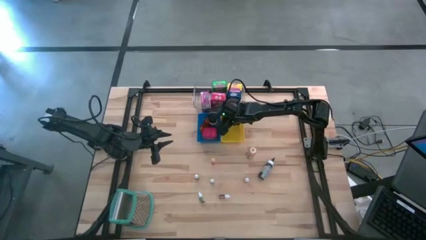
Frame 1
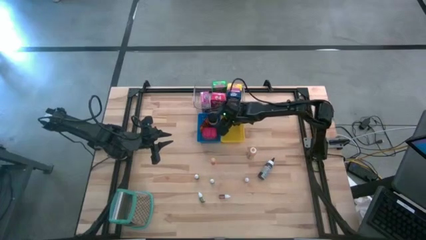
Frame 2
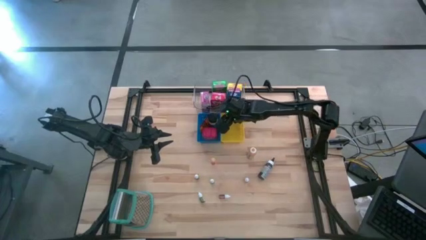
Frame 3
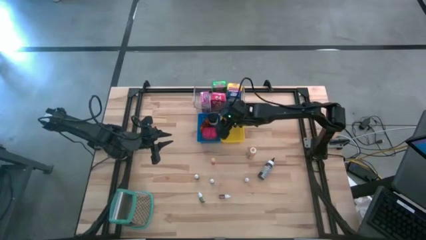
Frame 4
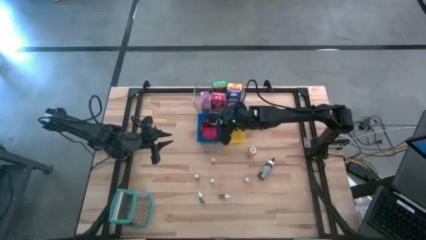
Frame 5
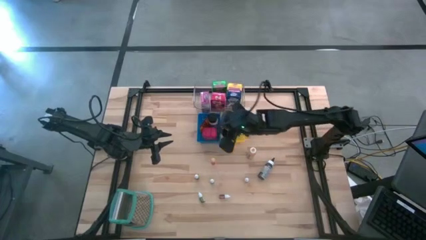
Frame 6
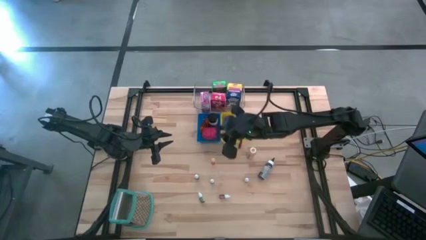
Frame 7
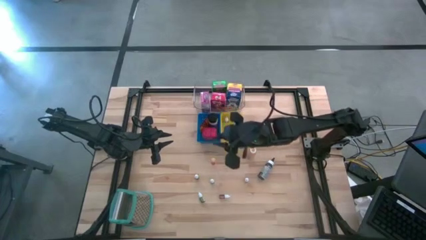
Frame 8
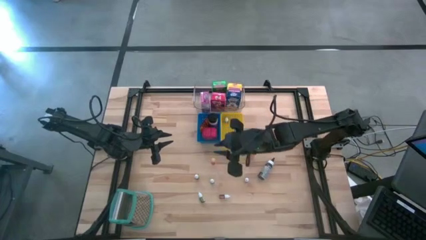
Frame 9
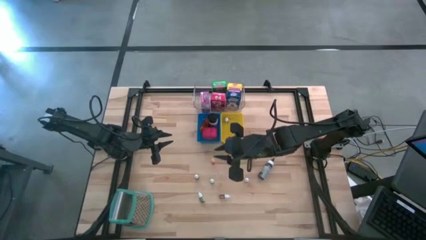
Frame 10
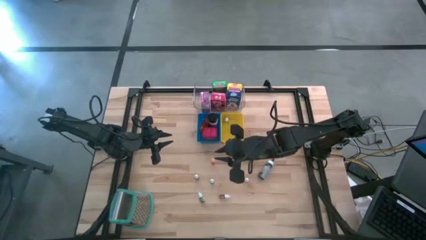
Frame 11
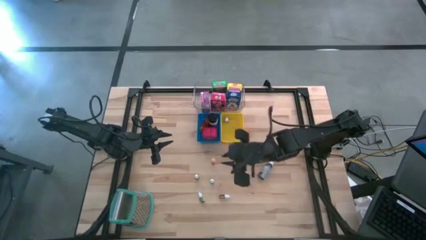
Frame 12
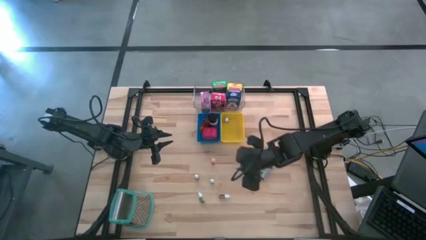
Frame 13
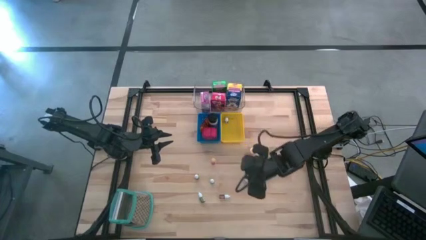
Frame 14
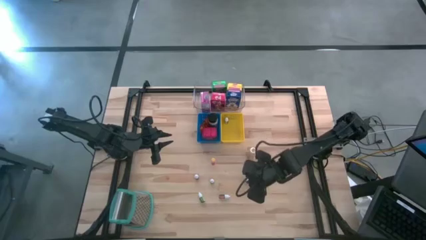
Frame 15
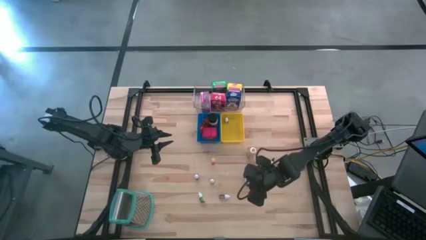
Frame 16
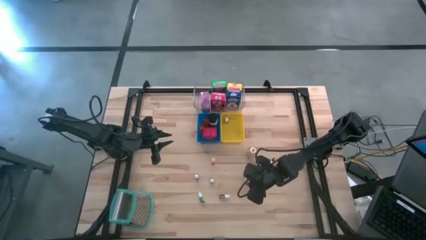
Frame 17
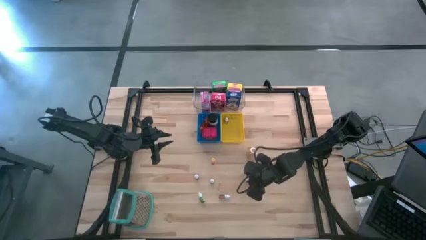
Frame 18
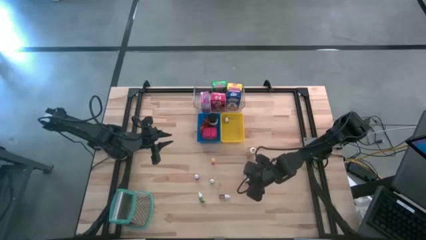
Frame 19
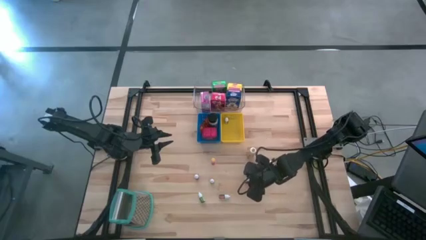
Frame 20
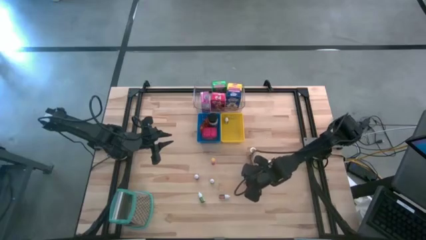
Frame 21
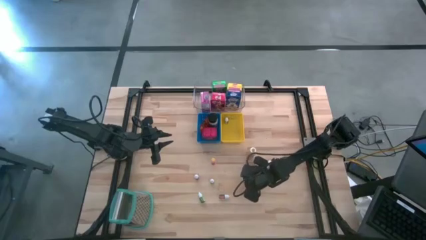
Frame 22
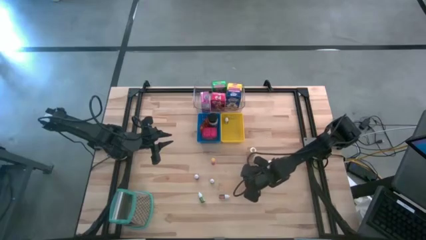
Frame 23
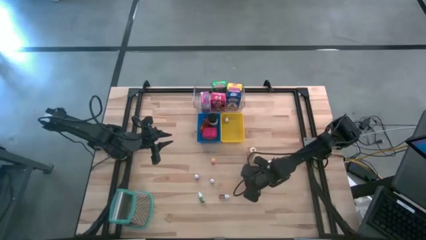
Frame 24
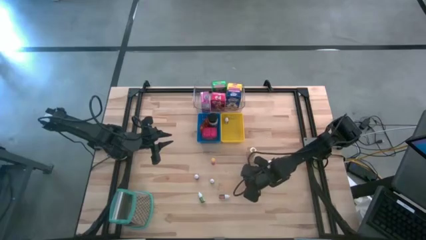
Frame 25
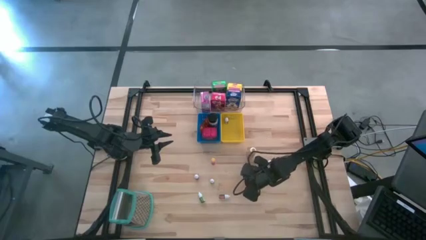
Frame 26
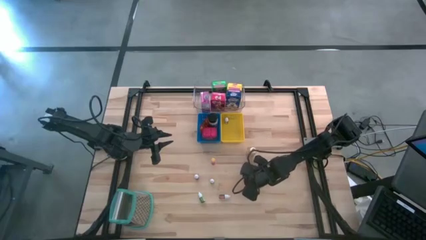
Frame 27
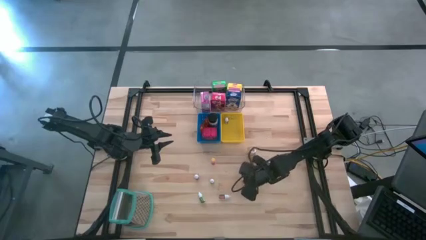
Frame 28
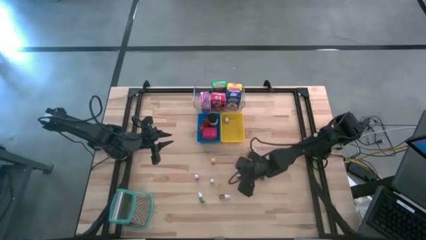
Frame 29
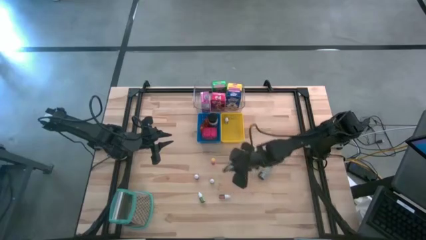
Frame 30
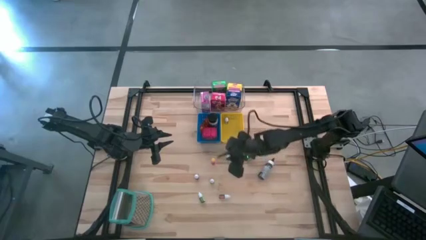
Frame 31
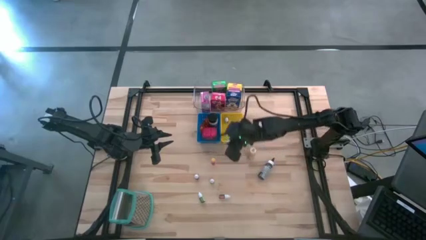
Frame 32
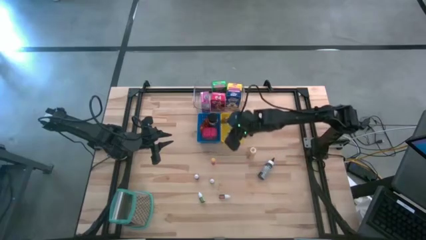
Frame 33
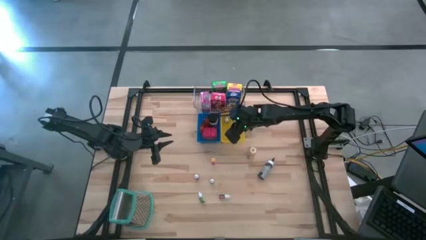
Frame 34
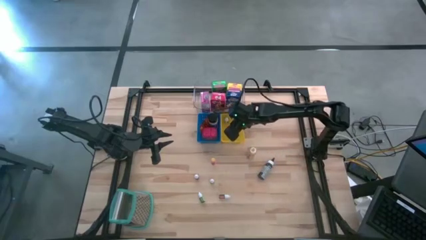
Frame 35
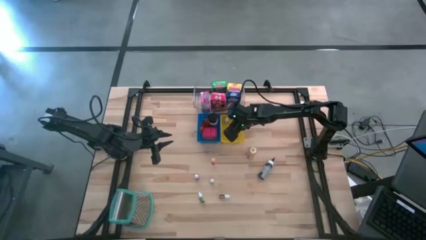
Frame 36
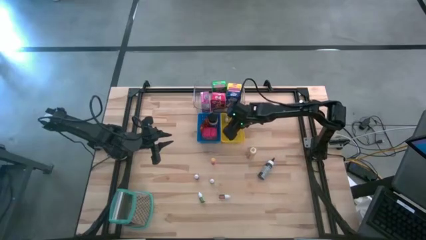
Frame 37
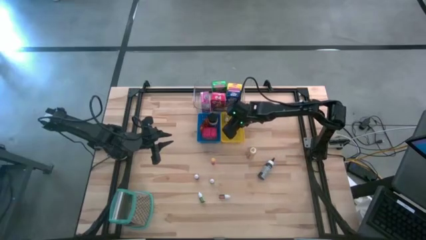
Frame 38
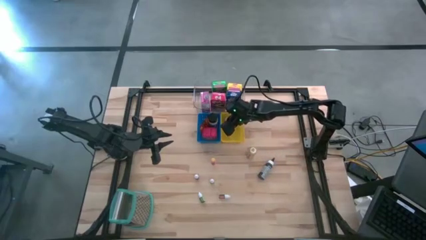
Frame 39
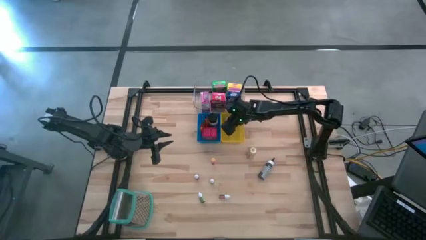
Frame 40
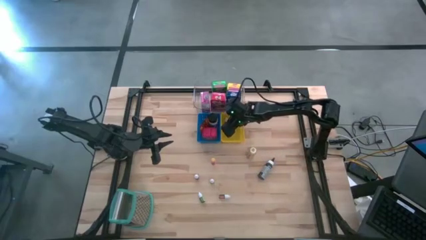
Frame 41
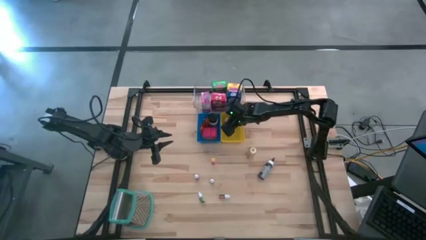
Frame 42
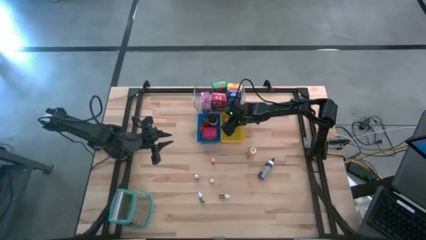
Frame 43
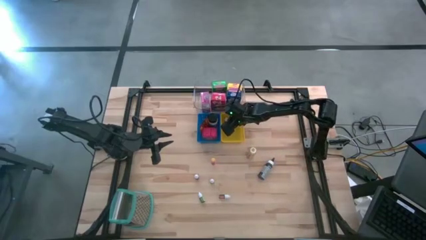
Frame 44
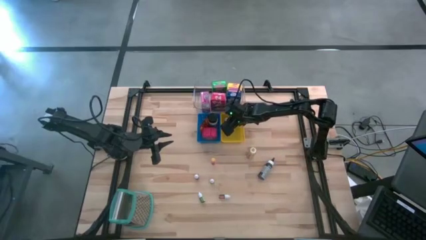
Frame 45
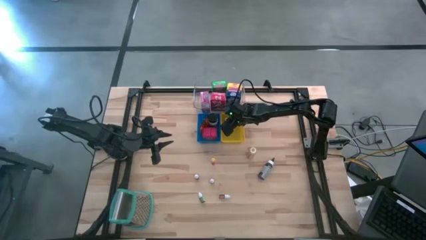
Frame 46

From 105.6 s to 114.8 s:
Task: Pick & Place Kitchen Items
Put the small black food coloring bottle into the yellow bin

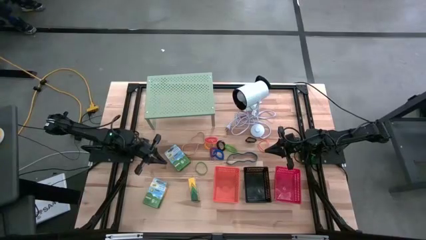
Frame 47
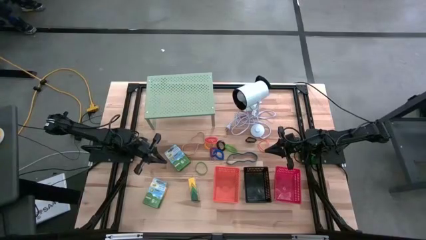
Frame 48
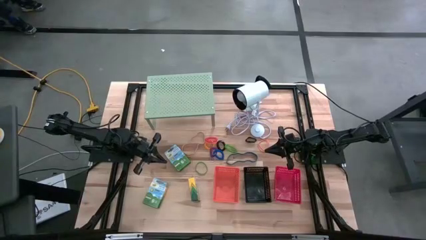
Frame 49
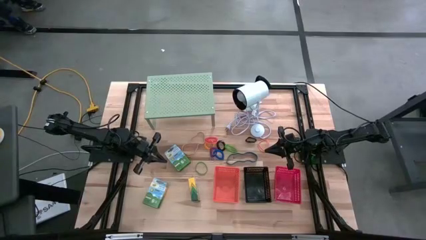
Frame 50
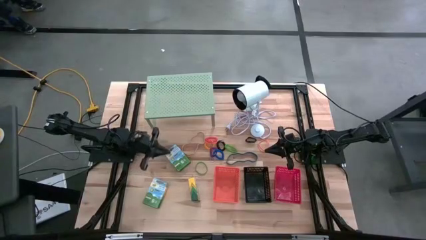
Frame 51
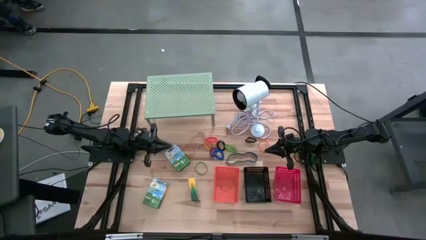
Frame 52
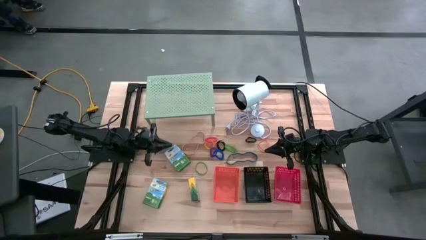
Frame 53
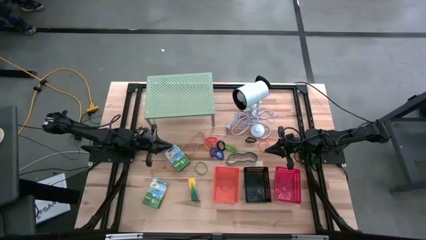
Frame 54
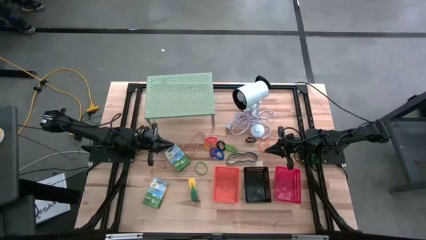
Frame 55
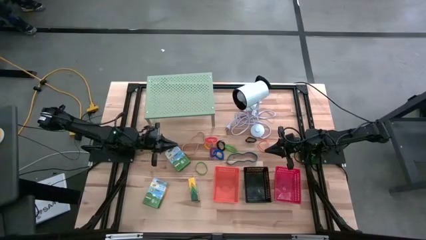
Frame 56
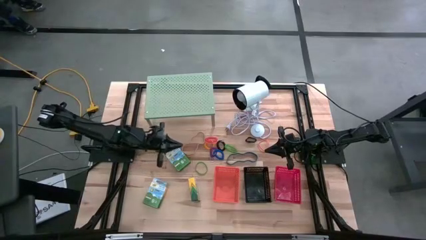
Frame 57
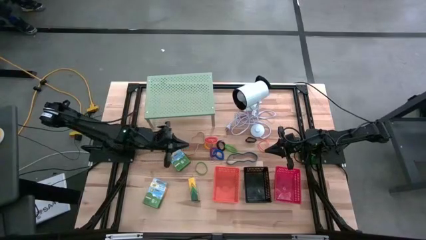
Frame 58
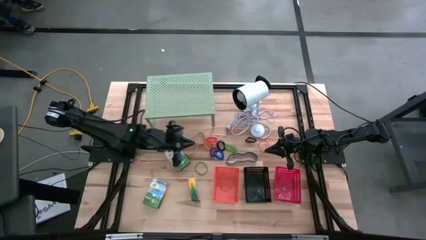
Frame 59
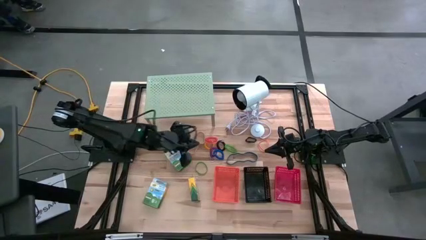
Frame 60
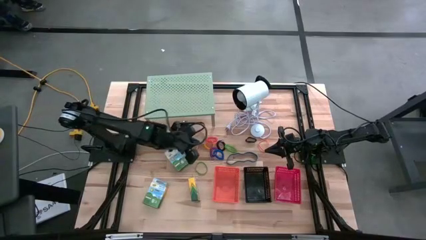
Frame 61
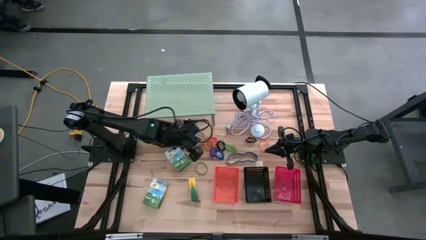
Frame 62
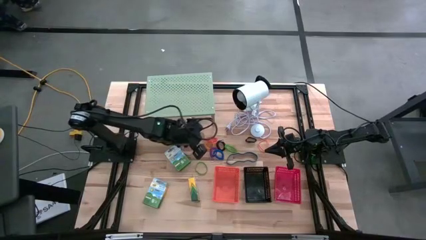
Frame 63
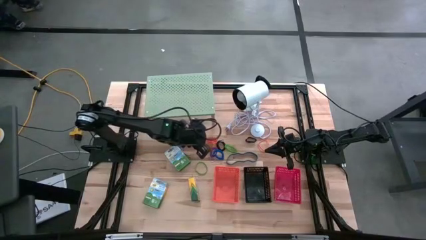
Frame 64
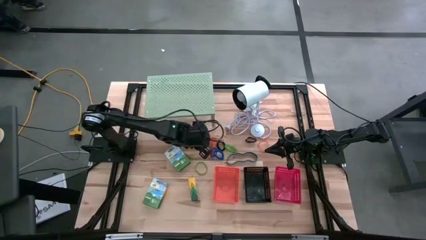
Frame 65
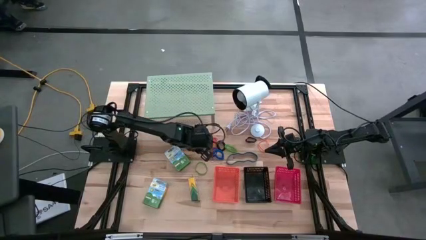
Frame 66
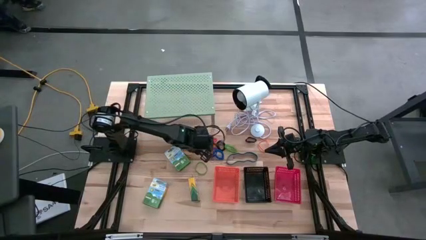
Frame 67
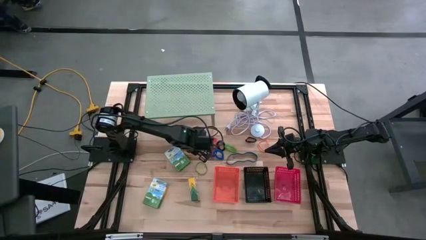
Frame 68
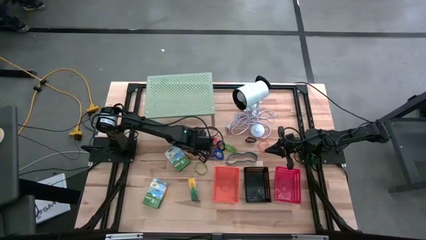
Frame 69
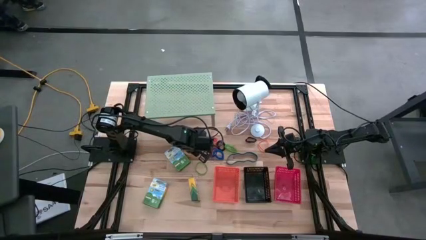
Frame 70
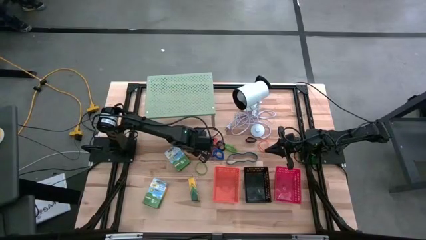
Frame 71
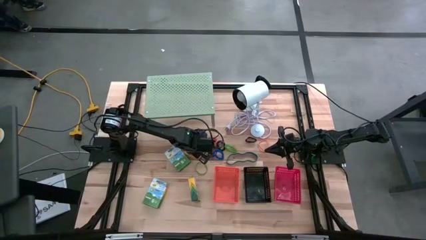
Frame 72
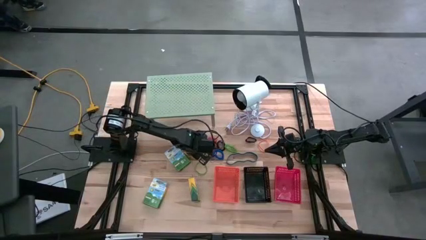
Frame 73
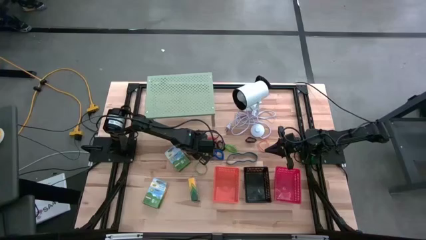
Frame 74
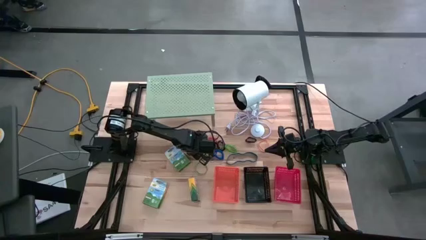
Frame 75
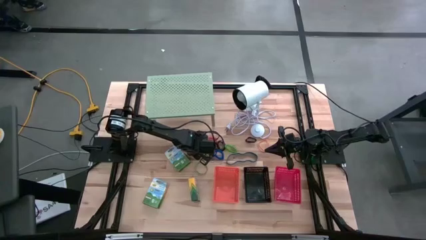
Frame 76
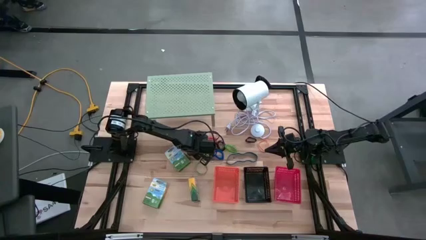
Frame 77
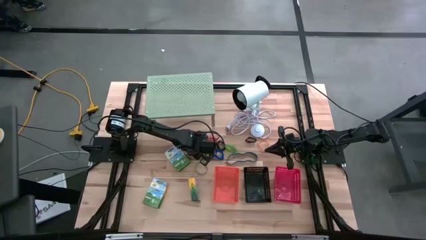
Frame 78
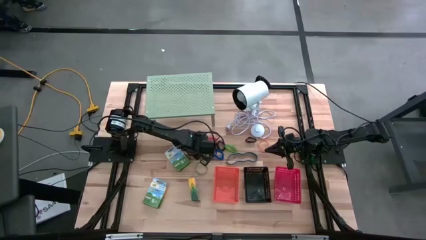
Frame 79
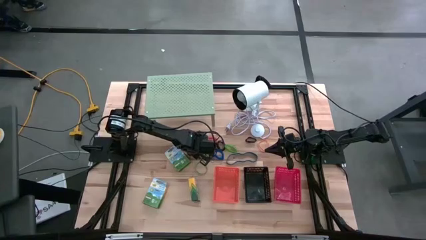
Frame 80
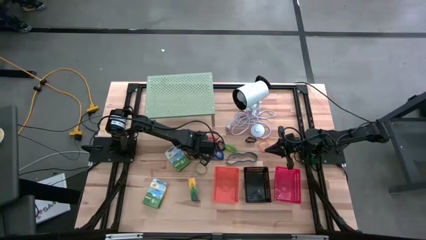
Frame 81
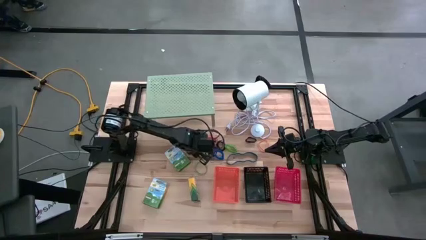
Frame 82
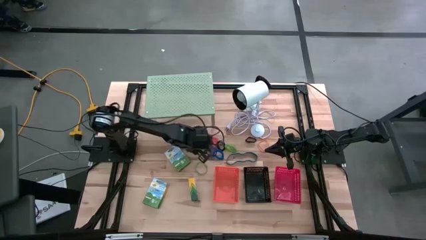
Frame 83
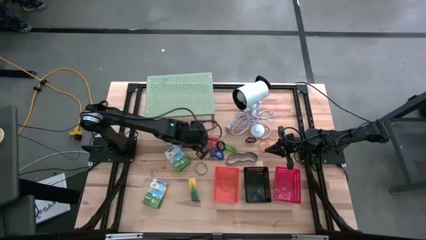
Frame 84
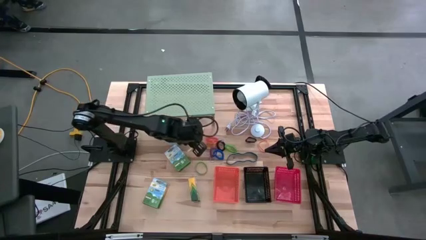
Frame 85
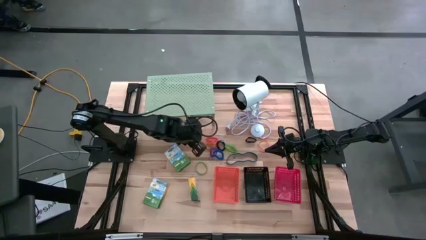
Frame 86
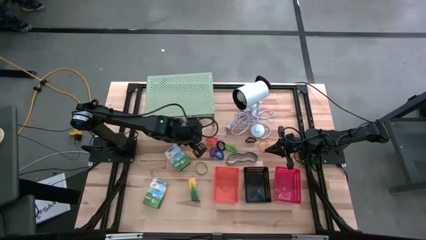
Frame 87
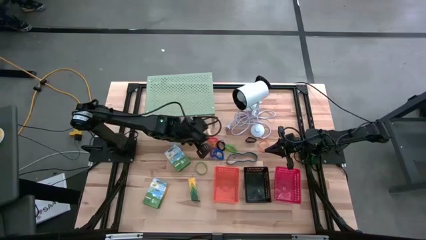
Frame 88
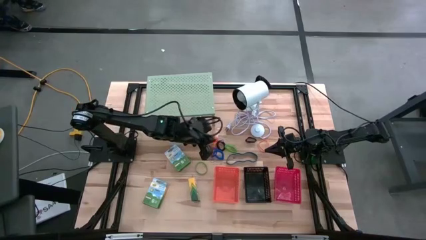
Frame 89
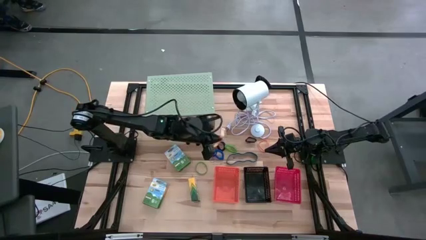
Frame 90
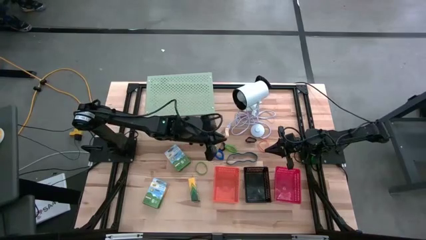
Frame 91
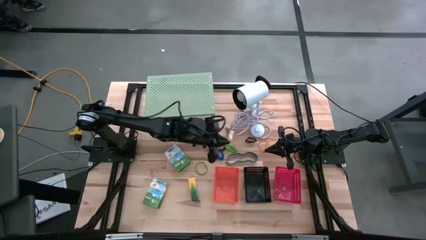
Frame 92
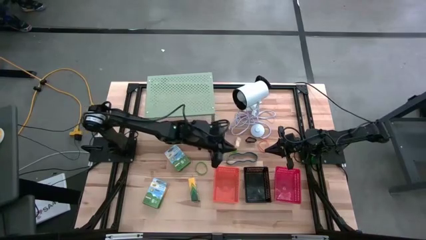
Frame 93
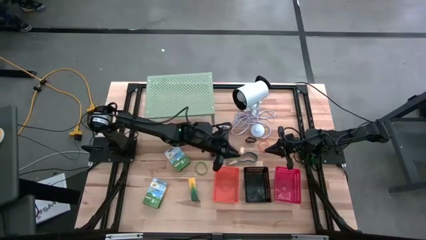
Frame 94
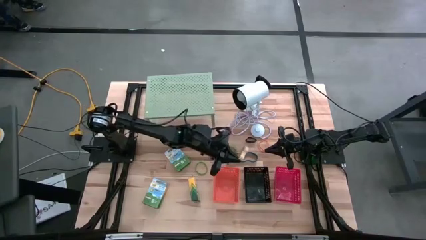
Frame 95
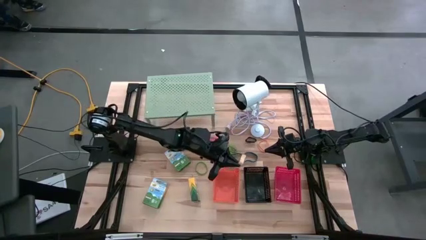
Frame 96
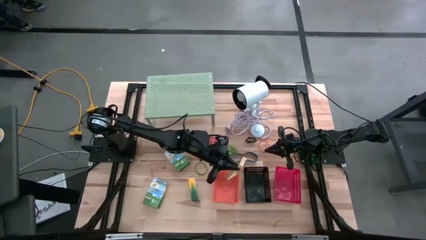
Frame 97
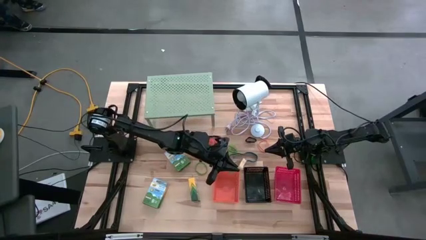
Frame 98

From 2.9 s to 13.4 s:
Task: Pick & Place Office Desk Supplies
Put the brown rubber band into the red basket
